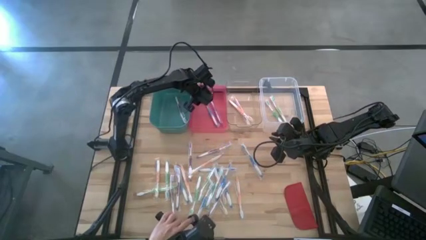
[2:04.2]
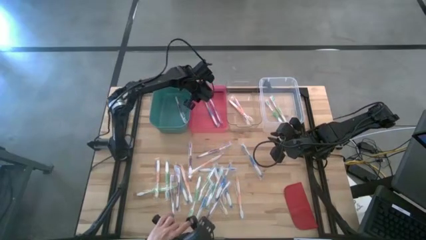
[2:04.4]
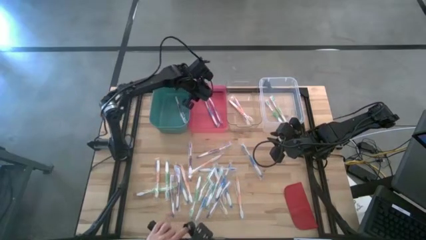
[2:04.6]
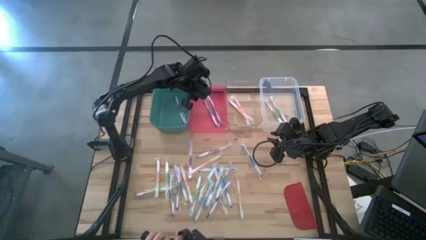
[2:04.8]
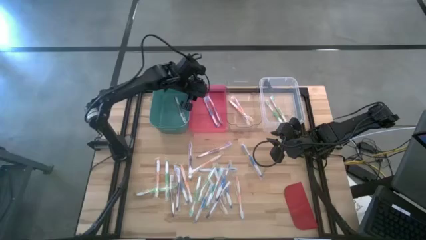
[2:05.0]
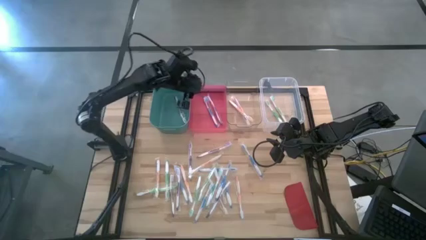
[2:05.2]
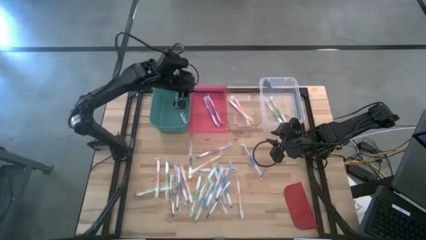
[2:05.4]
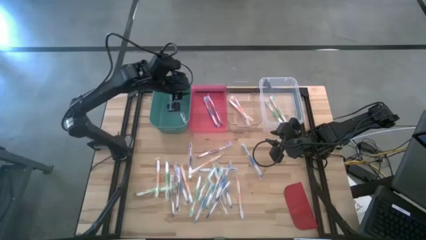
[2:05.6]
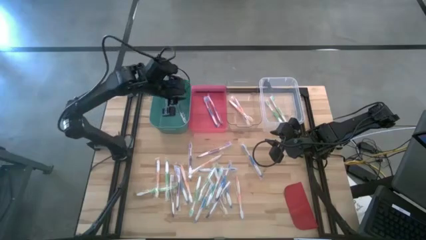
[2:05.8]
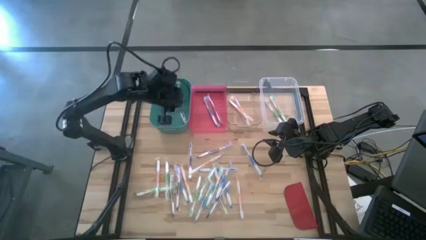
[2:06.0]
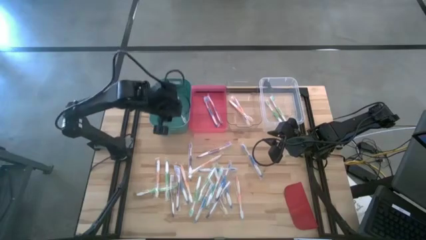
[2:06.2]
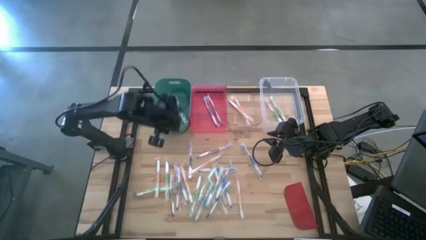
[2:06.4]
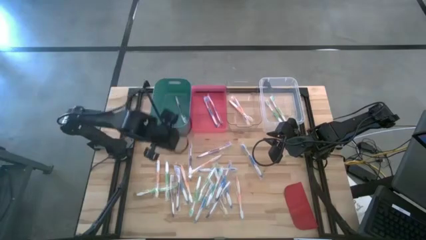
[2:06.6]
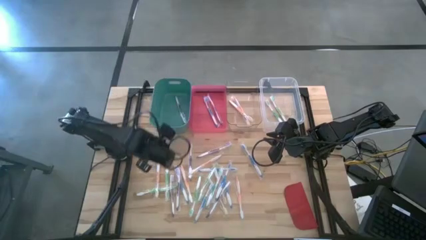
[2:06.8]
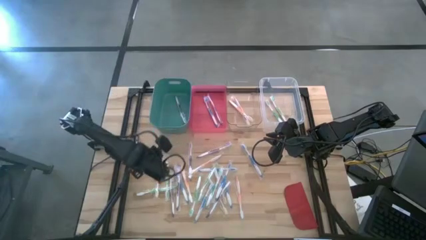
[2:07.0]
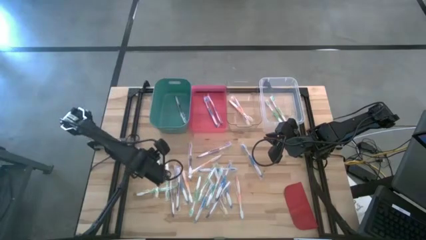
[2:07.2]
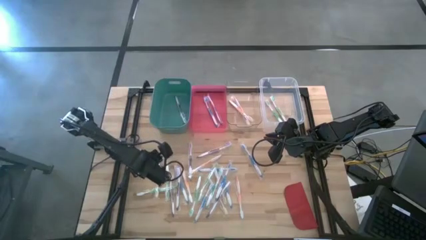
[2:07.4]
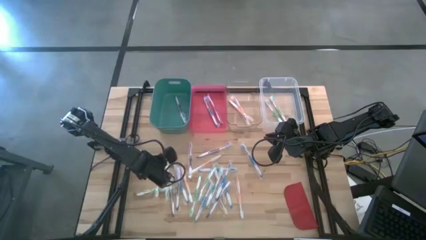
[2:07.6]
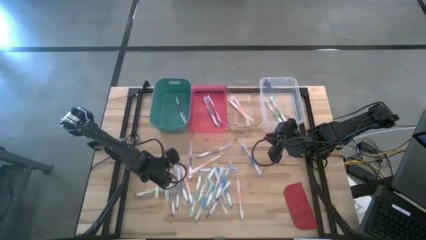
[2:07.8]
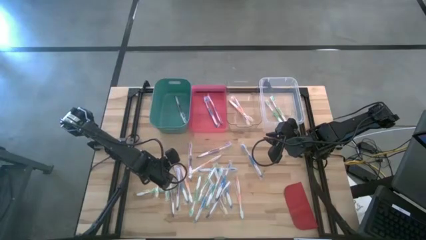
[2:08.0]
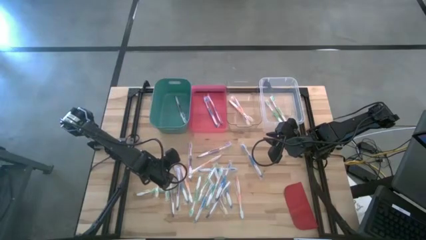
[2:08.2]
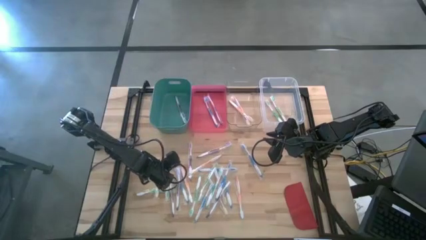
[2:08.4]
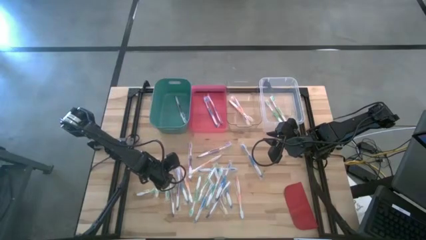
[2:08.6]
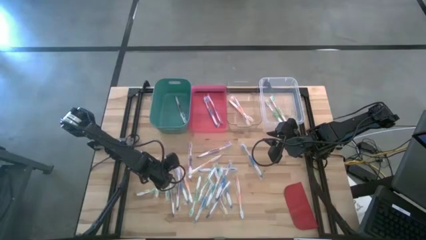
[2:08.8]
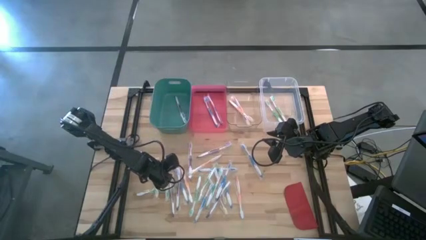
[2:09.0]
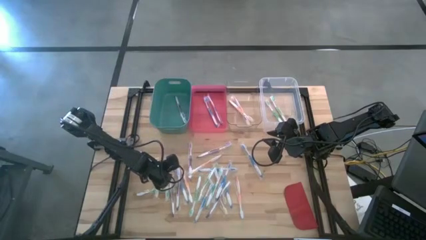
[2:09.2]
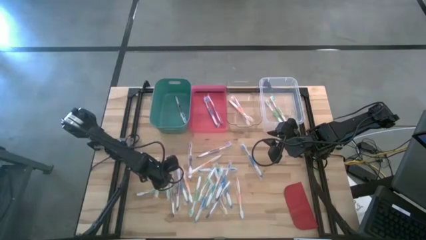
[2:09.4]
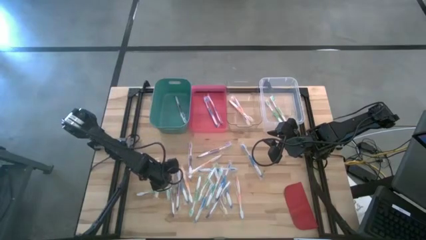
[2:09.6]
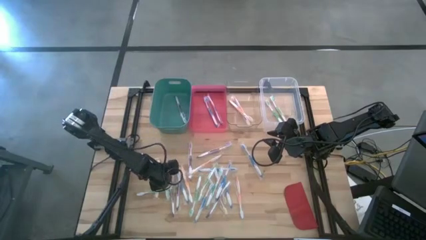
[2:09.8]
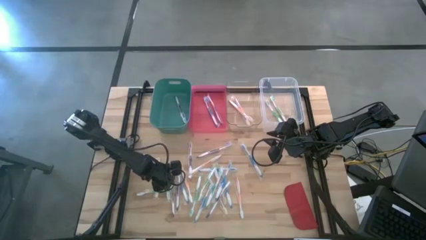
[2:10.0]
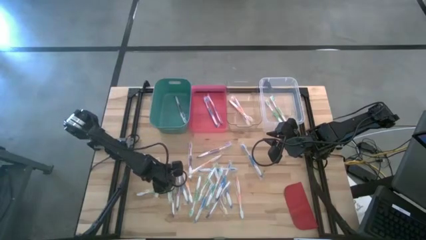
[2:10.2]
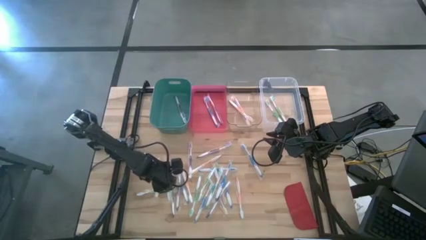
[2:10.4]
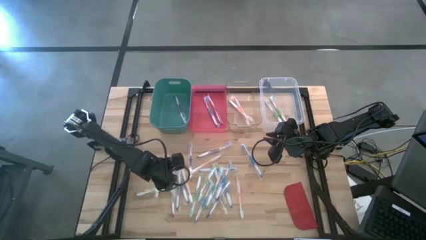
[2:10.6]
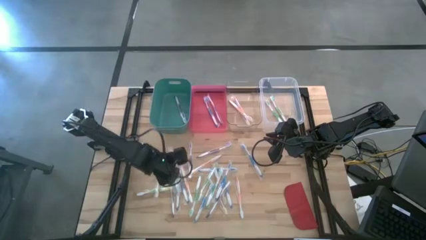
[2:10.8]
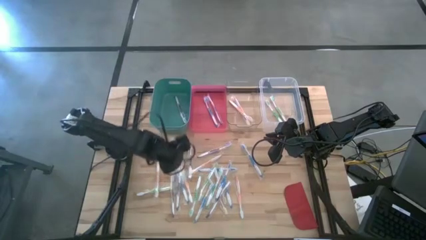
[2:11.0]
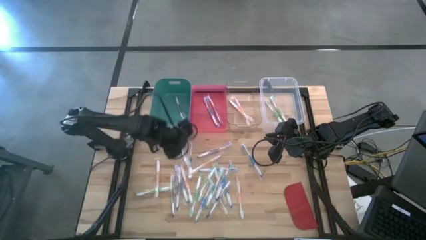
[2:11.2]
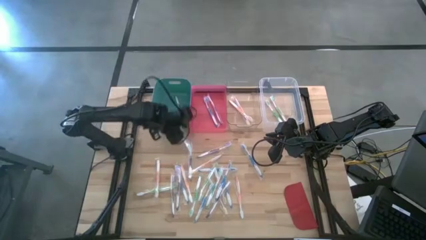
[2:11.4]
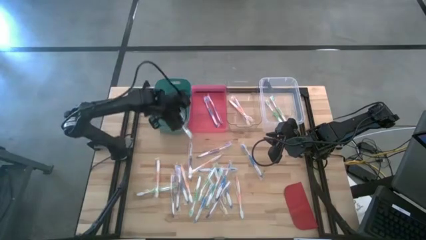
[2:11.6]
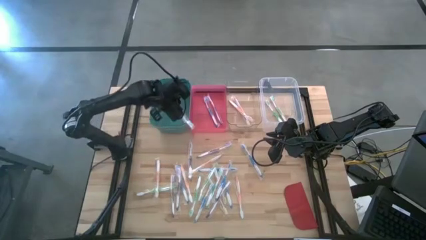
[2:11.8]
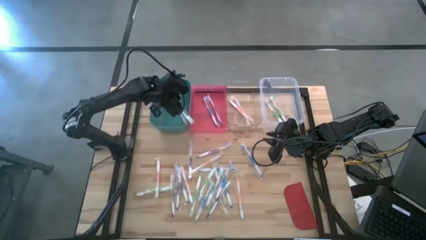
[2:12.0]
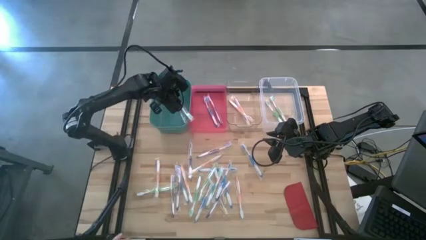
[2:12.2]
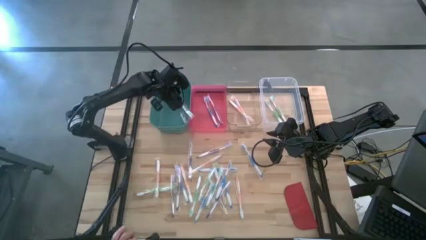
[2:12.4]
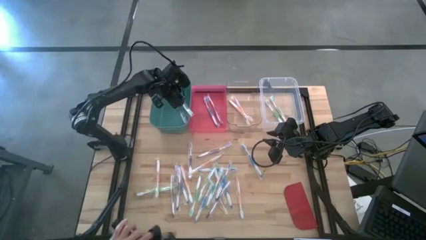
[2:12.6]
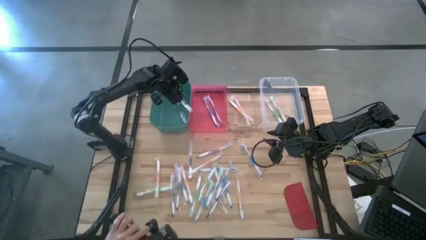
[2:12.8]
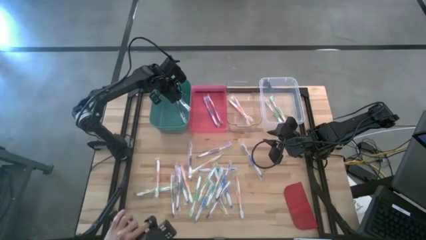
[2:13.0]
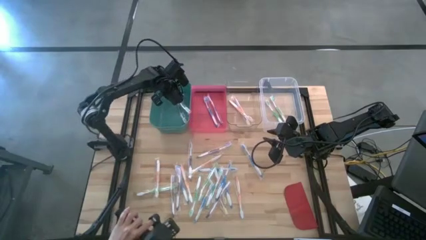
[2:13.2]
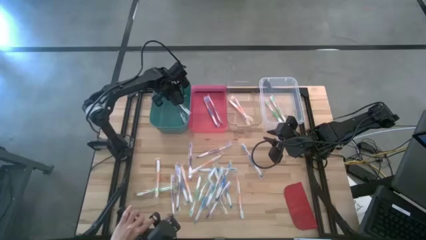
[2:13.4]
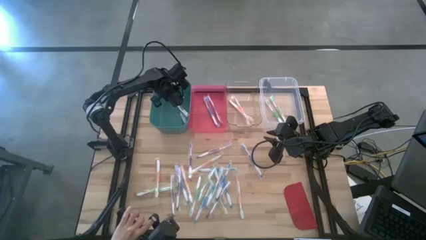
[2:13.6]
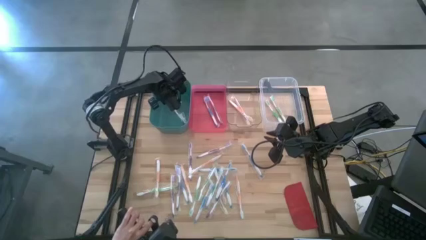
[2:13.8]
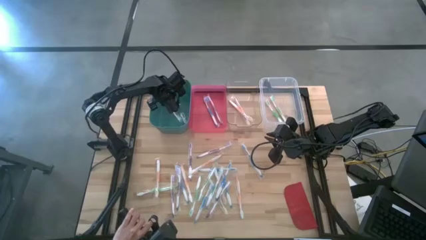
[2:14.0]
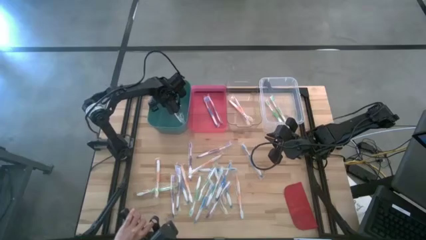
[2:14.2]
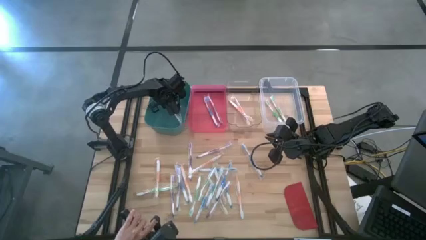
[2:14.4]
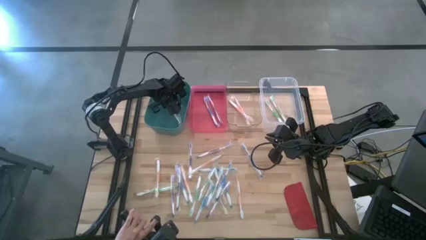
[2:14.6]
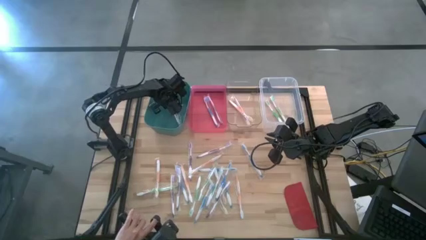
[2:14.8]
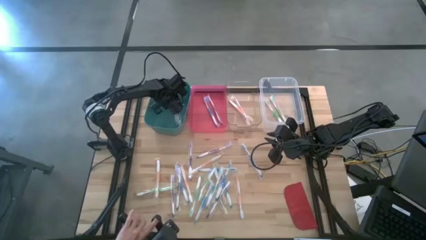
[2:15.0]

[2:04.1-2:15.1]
Task: Pick & Place Toothbrushes
Put the green toothbrush into the white bin

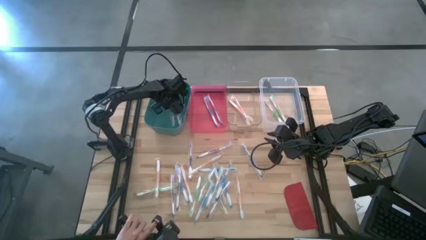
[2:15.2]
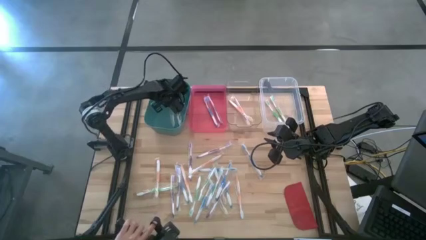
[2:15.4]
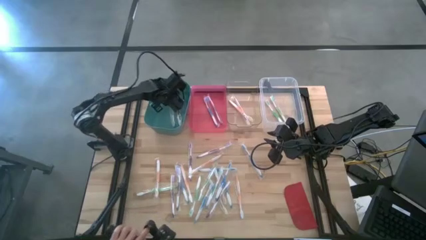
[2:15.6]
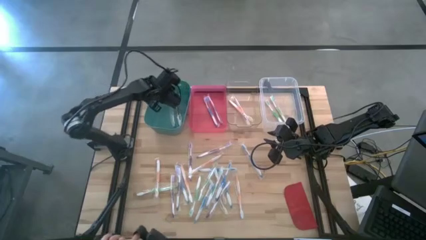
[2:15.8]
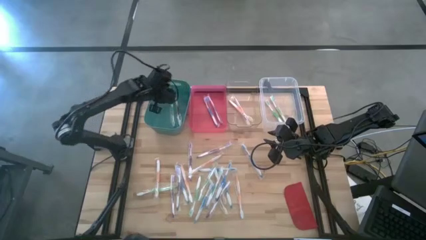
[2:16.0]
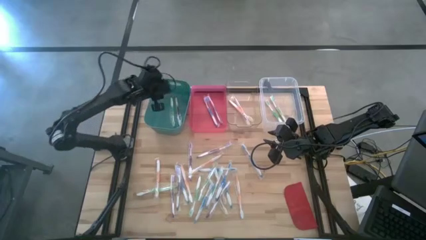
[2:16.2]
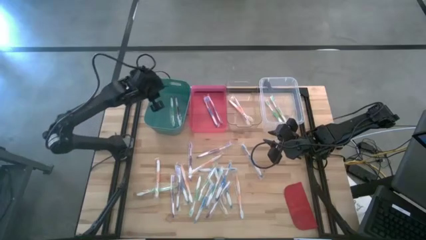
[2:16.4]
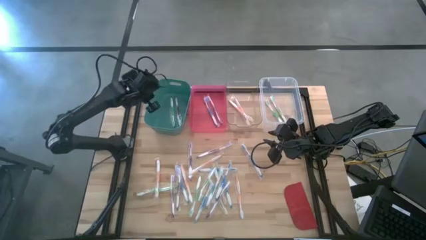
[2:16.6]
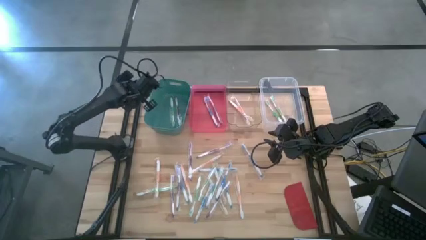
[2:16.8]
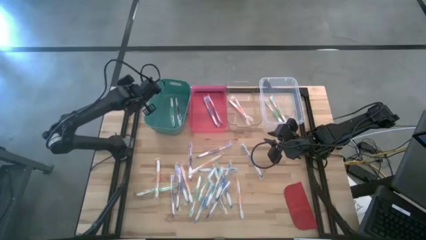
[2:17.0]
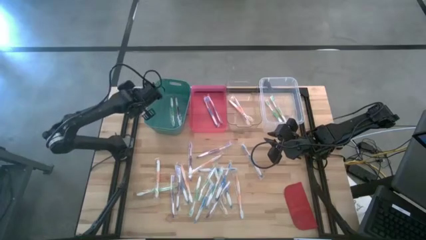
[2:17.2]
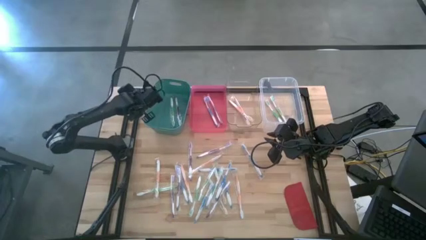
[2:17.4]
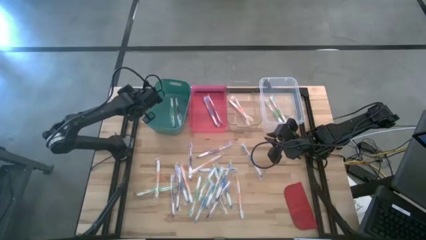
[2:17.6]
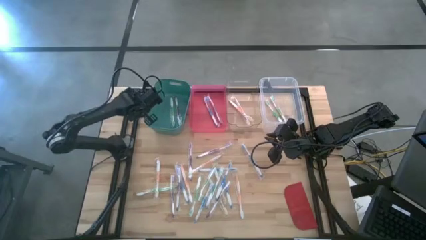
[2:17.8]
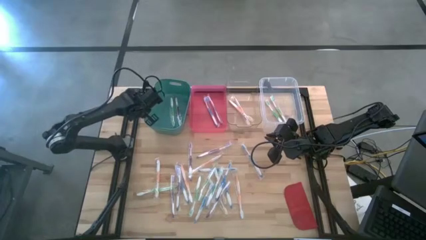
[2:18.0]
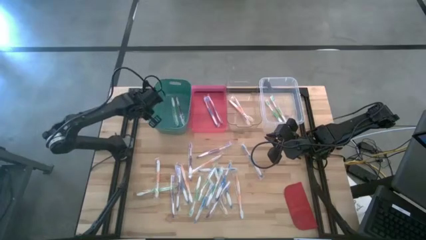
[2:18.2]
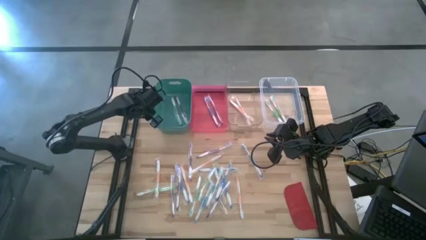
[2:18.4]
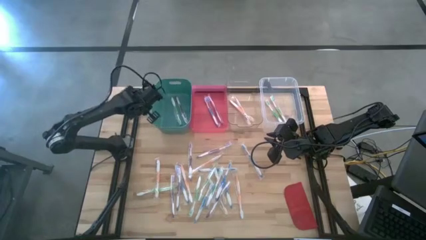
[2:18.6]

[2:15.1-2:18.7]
Adjust the green bin

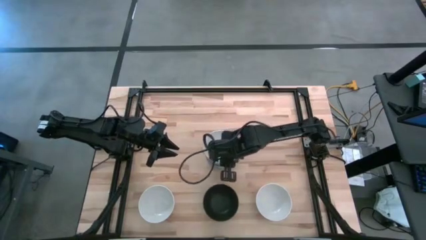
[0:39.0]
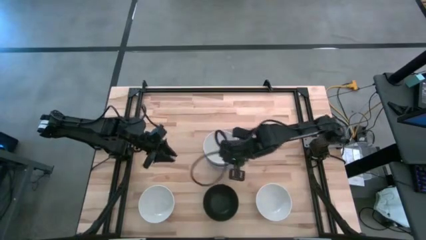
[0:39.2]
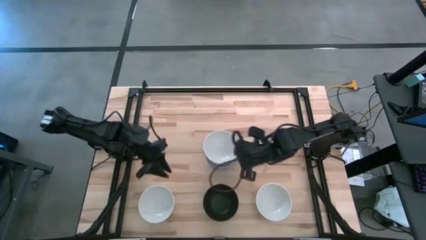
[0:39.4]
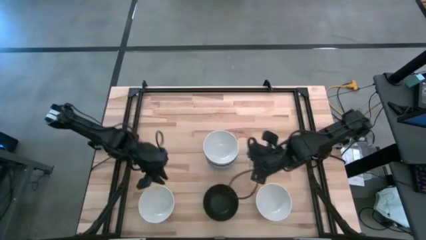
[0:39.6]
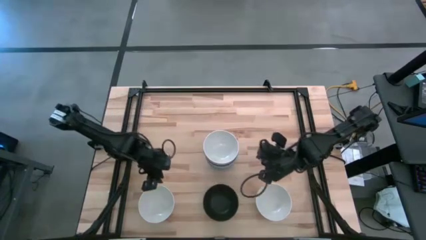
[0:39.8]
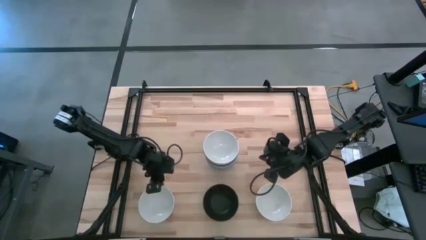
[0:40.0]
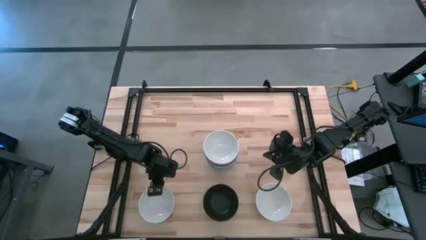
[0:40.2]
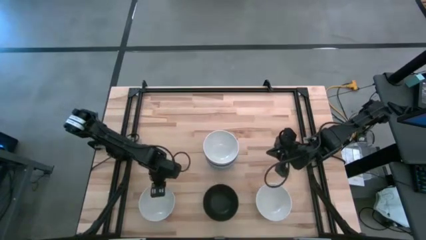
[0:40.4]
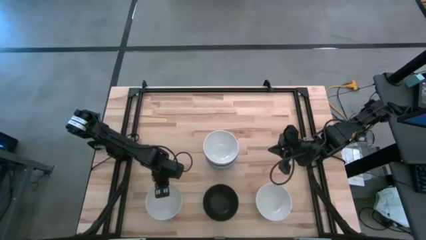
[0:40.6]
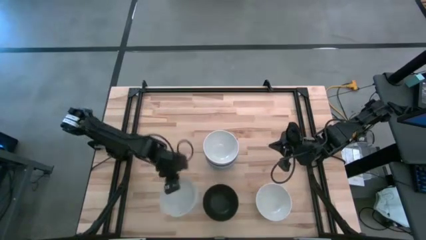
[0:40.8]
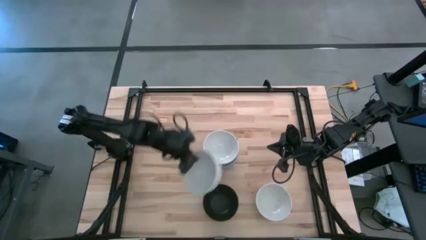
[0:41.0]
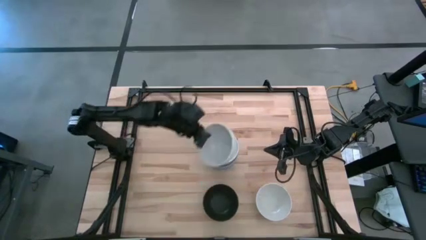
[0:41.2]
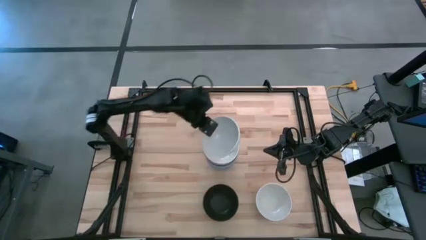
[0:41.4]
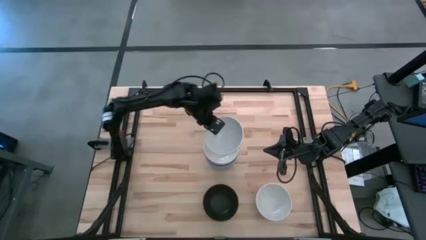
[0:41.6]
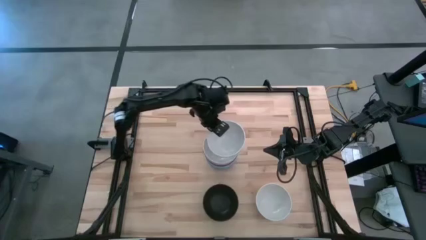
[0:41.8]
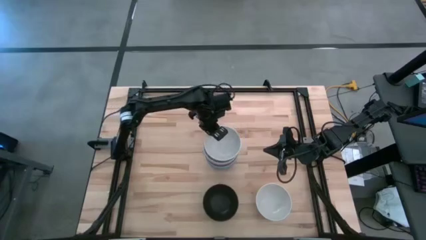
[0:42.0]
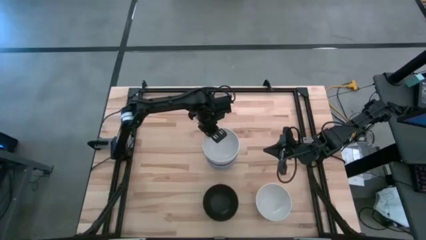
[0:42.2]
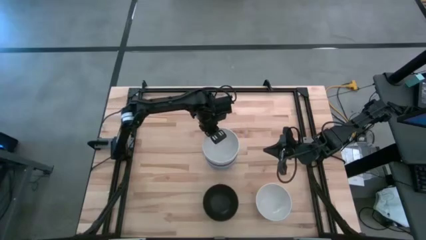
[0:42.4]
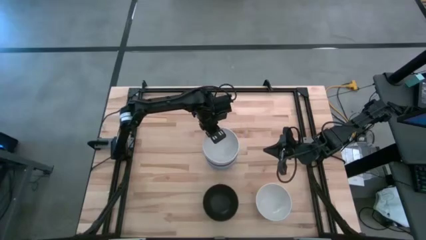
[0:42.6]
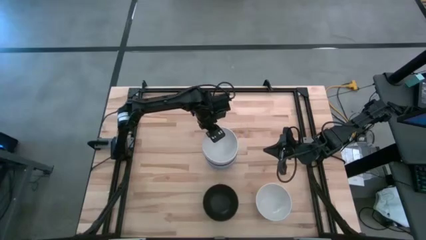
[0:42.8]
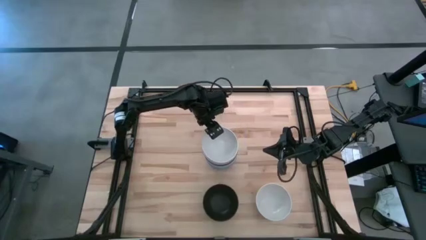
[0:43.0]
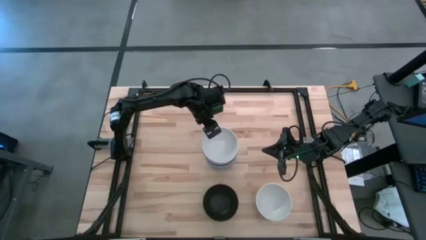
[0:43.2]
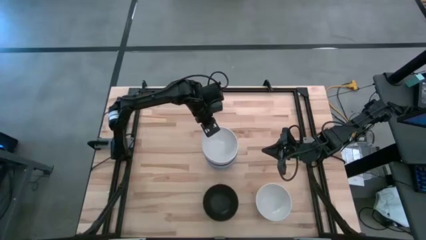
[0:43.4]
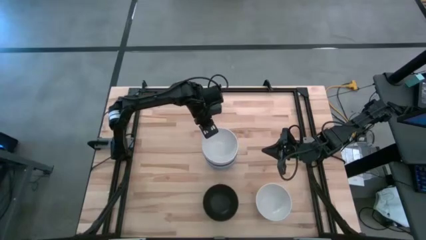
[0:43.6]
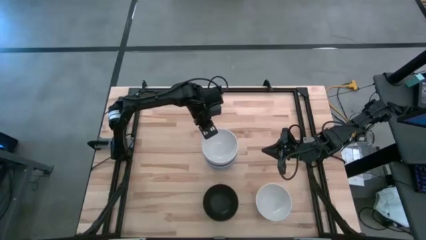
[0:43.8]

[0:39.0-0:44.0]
Task: Nest bowls inside each other
Stack the left white bowl on top of the other top white bowl
